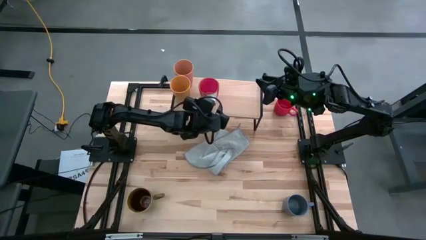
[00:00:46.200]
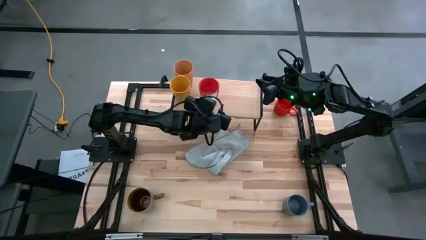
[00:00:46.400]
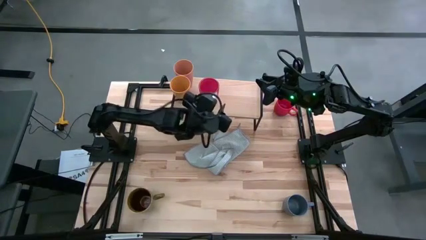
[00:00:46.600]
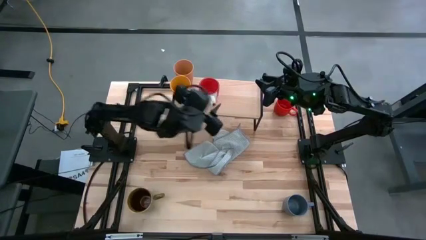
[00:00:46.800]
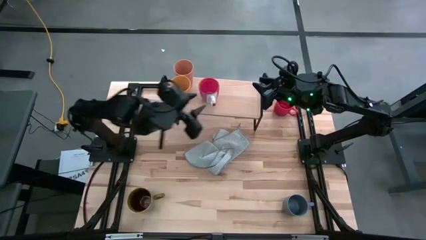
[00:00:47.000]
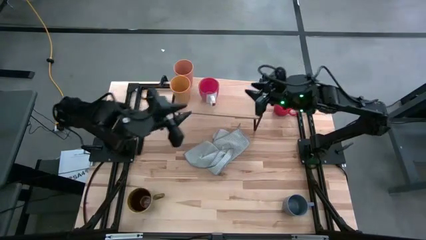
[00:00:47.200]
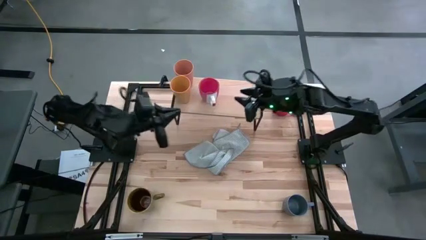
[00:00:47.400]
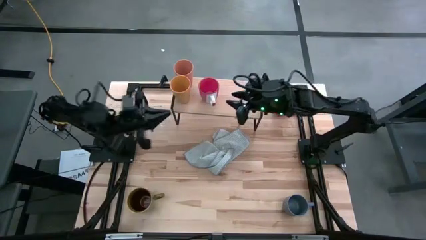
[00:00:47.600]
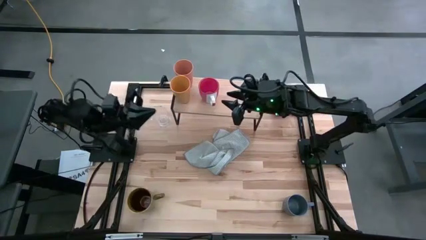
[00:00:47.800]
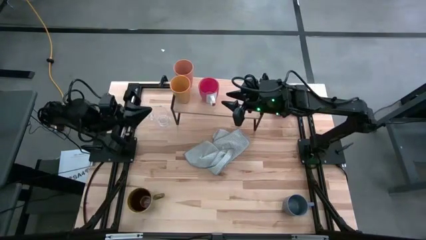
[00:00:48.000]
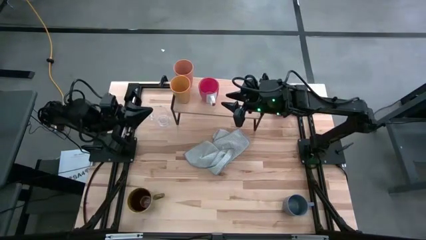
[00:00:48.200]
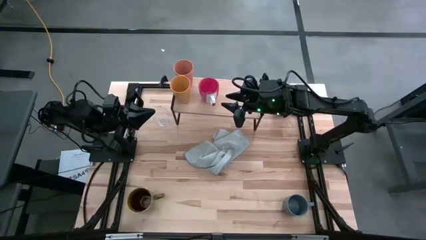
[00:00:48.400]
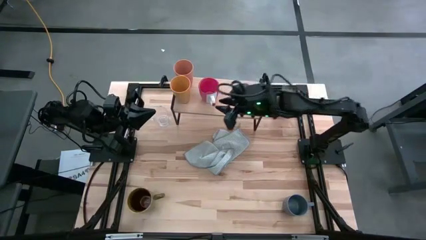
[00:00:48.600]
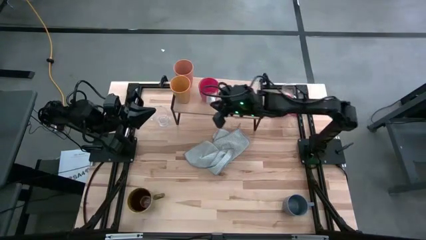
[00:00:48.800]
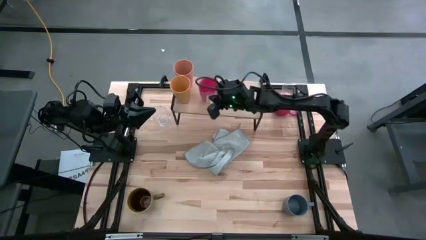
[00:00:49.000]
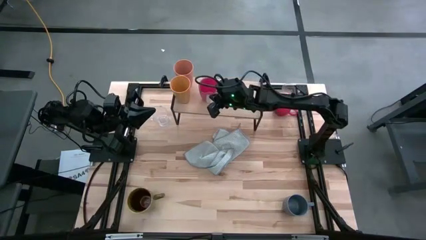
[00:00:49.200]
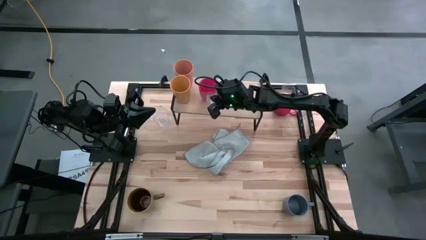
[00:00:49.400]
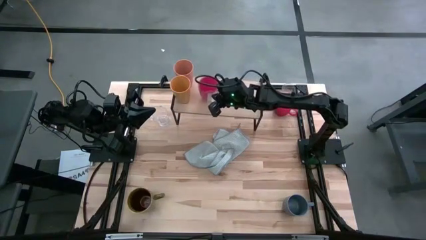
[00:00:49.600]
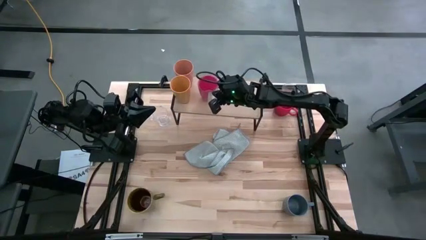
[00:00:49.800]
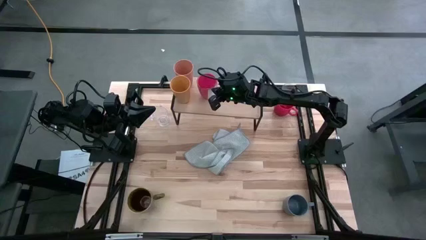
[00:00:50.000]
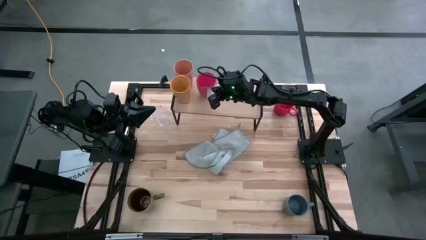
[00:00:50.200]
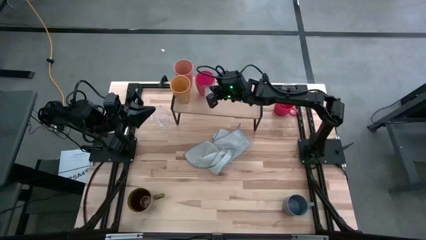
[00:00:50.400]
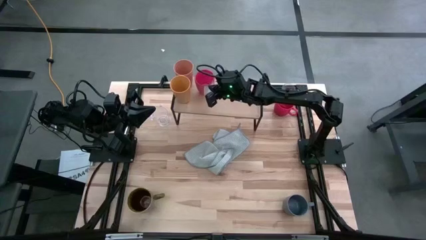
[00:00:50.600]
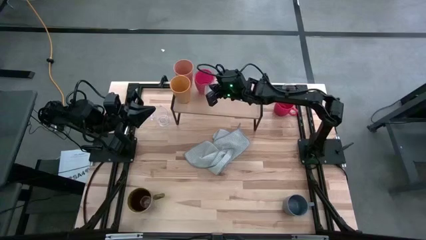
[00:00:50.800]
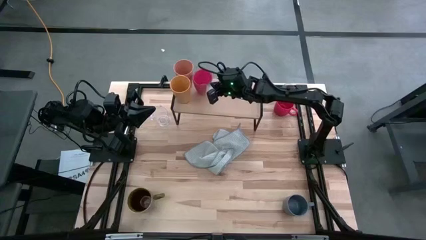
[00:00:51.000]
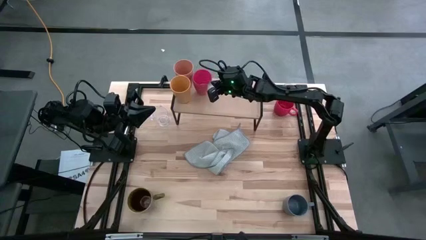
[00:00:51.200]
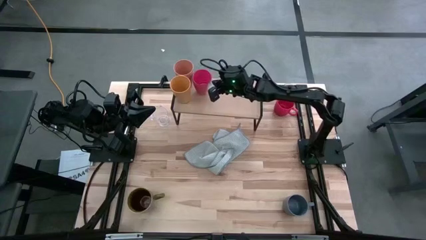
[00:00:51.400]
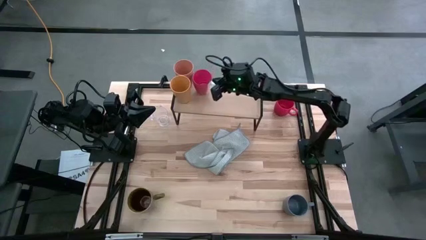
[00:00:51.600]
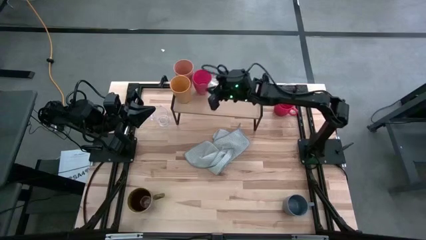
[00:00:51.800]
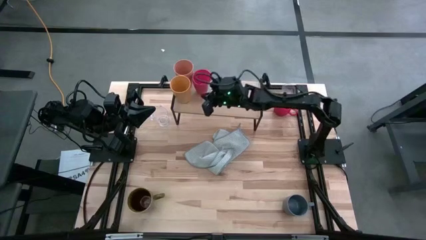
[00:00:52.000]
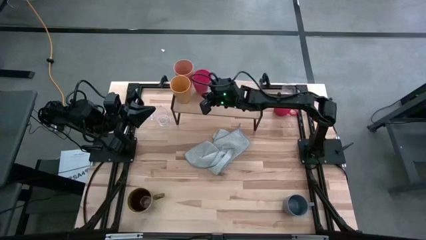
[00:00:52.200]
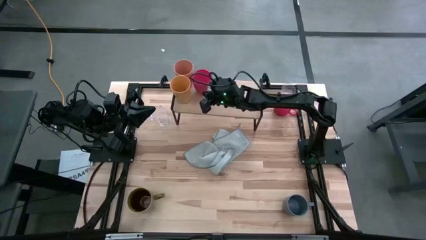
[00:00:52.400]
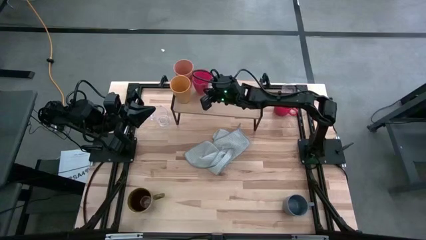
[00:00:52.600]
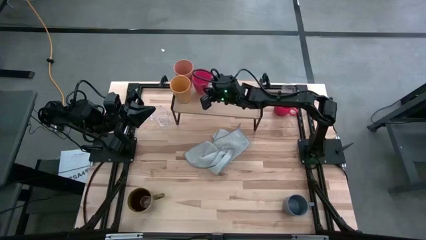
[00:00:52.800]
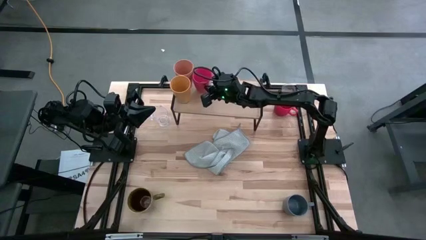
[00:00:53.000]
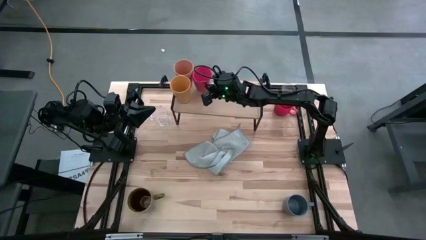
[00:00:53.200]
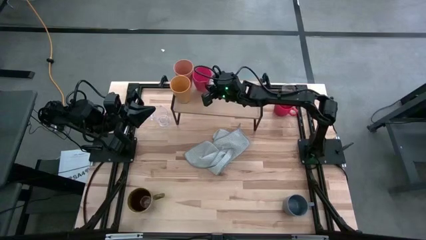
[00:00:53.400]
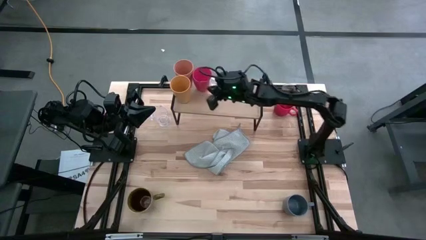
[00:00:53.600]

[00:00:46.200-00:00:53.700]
Task: Stack small to large cups/mugs on shelf
Adjust the red mug on the shelf

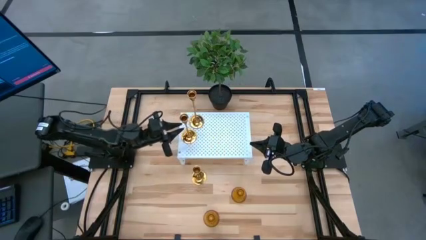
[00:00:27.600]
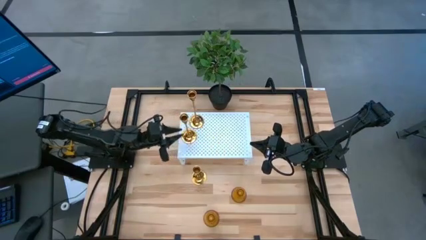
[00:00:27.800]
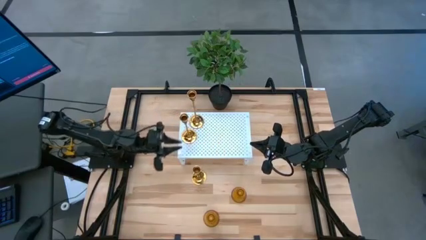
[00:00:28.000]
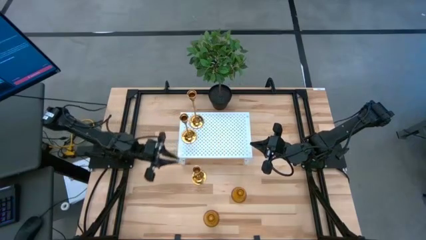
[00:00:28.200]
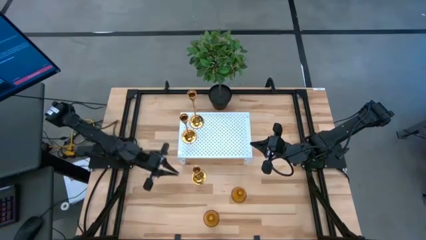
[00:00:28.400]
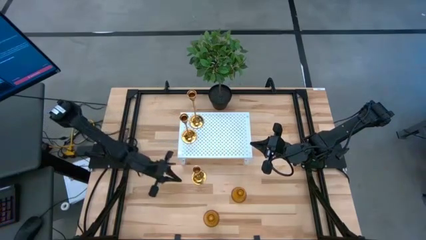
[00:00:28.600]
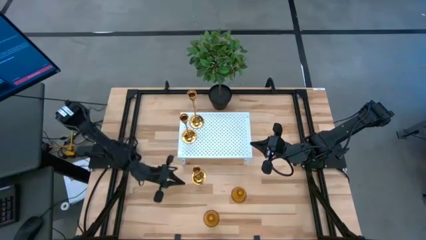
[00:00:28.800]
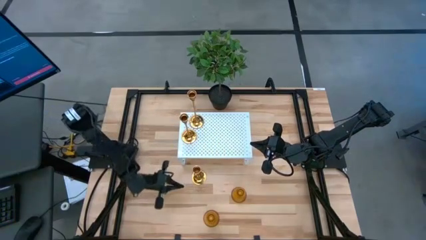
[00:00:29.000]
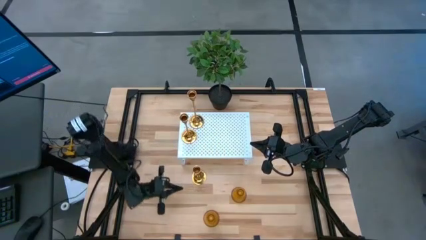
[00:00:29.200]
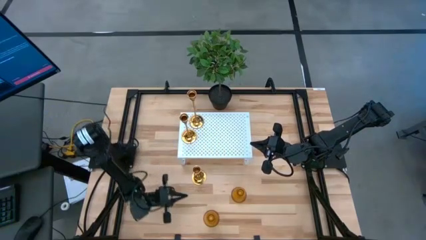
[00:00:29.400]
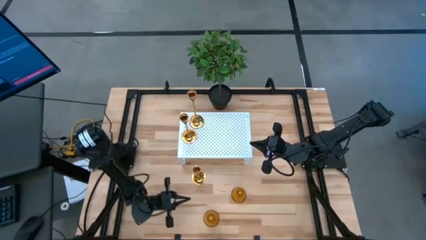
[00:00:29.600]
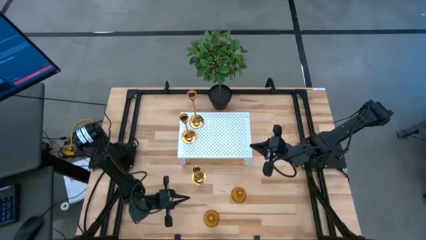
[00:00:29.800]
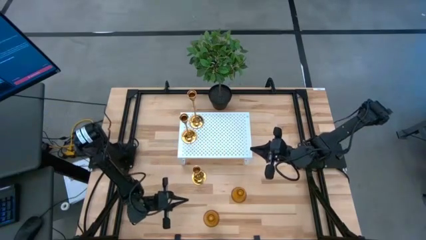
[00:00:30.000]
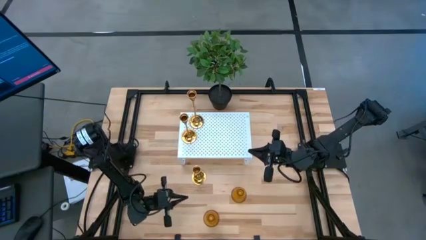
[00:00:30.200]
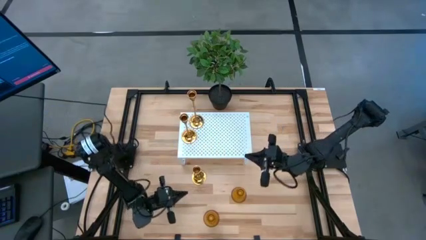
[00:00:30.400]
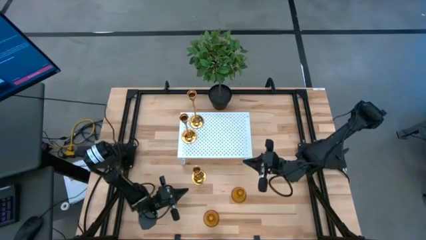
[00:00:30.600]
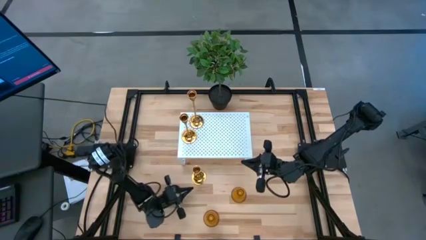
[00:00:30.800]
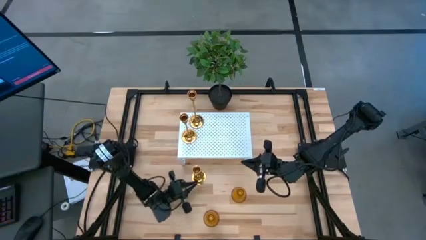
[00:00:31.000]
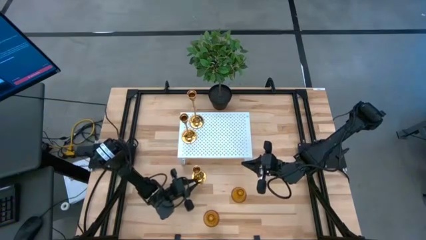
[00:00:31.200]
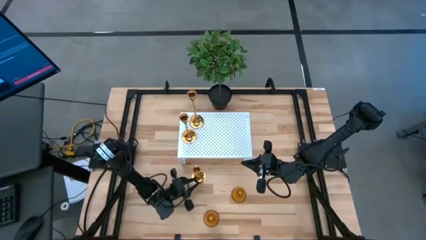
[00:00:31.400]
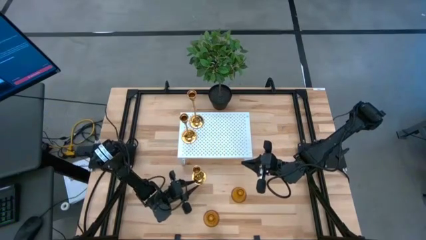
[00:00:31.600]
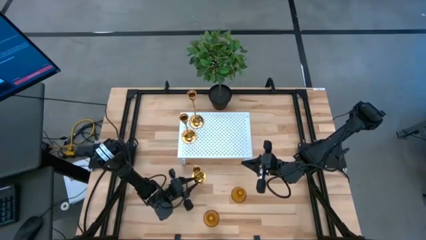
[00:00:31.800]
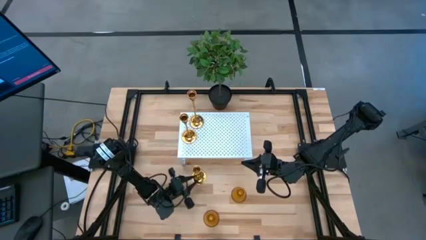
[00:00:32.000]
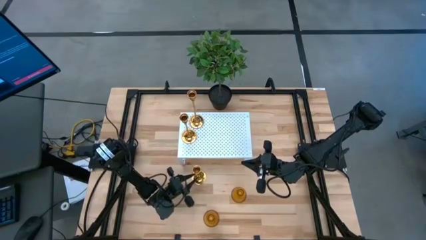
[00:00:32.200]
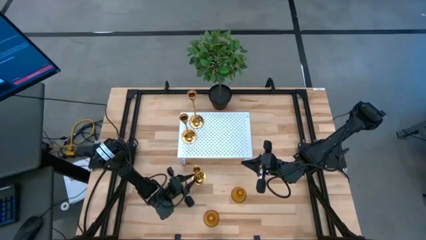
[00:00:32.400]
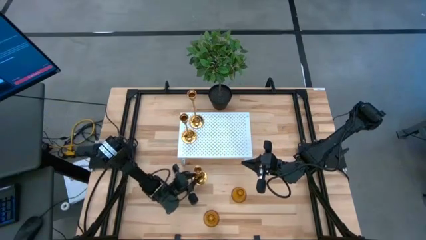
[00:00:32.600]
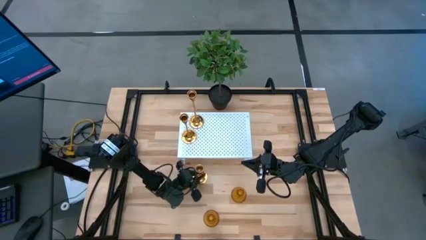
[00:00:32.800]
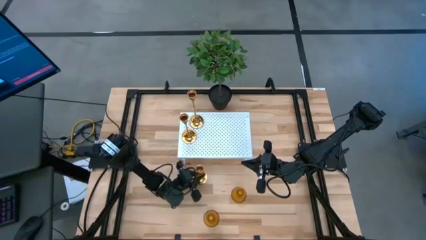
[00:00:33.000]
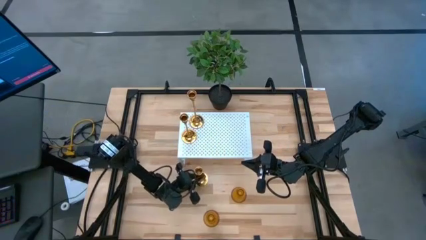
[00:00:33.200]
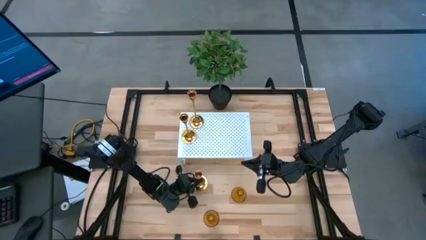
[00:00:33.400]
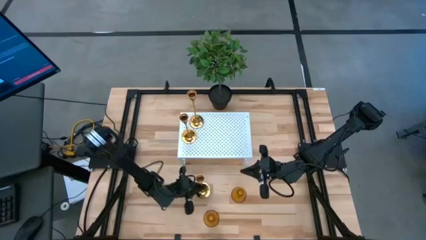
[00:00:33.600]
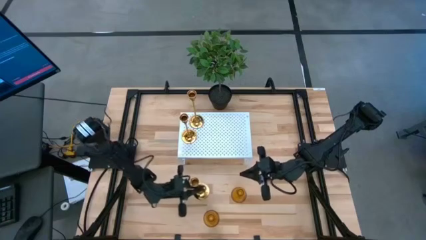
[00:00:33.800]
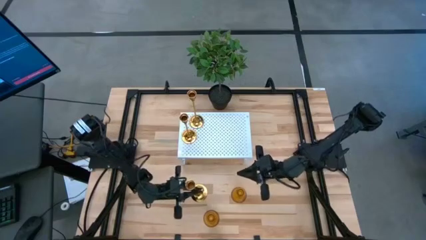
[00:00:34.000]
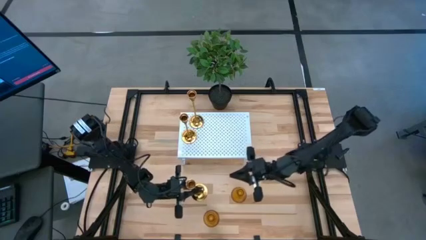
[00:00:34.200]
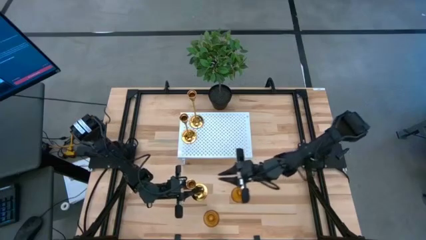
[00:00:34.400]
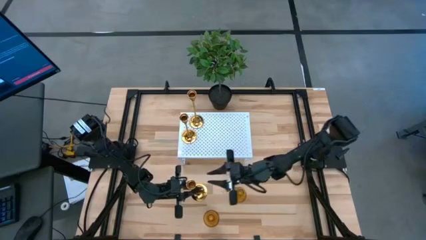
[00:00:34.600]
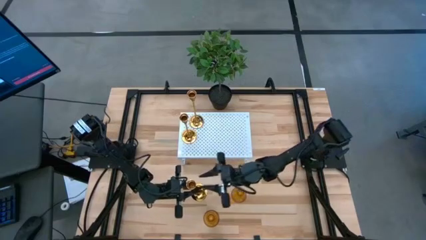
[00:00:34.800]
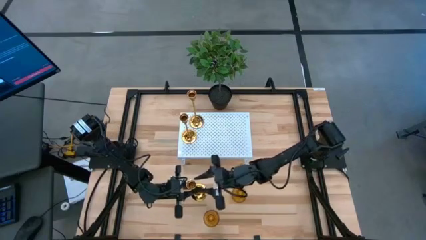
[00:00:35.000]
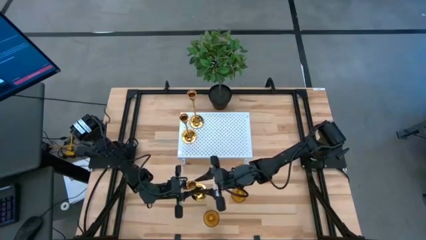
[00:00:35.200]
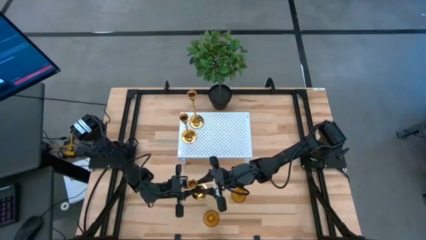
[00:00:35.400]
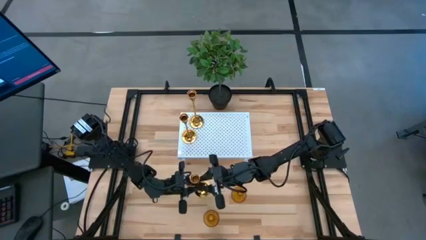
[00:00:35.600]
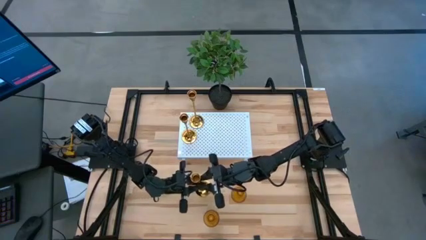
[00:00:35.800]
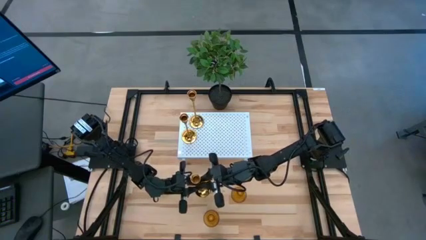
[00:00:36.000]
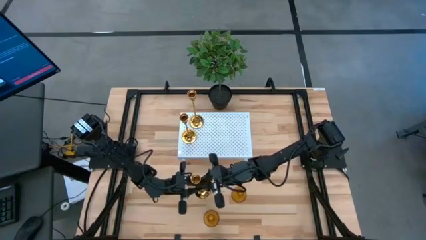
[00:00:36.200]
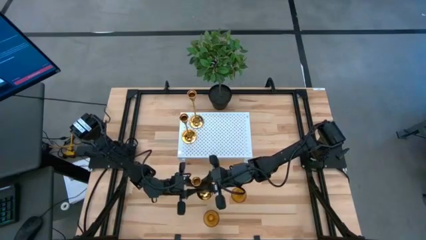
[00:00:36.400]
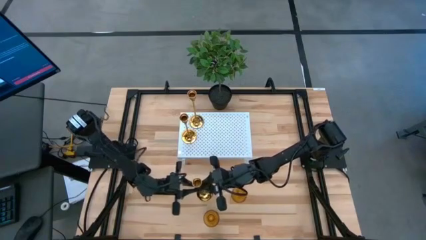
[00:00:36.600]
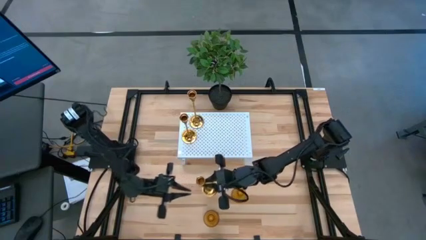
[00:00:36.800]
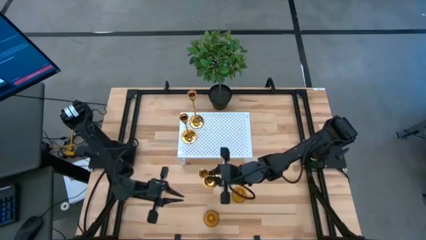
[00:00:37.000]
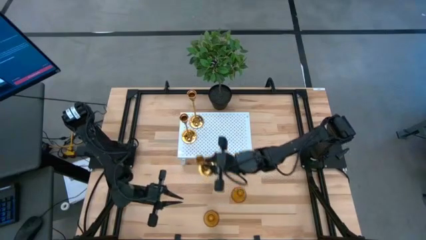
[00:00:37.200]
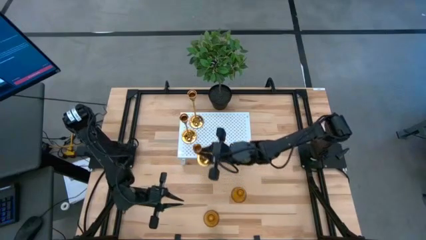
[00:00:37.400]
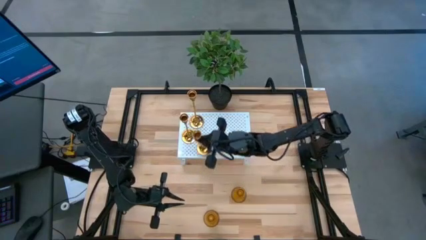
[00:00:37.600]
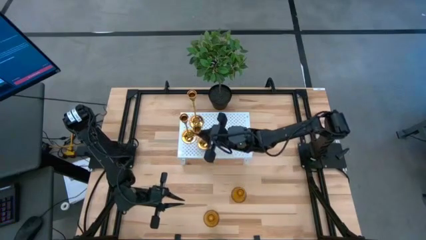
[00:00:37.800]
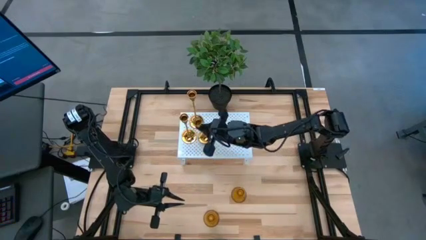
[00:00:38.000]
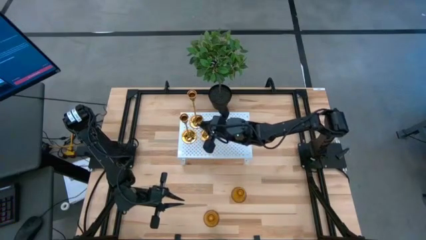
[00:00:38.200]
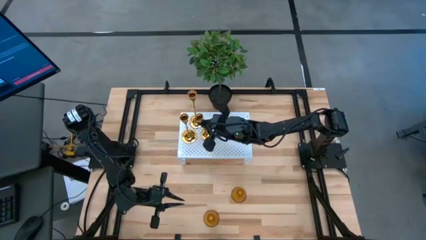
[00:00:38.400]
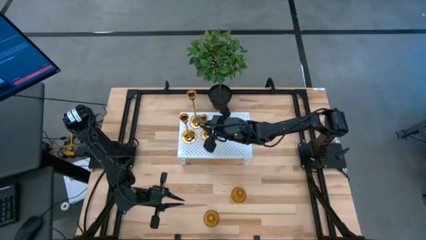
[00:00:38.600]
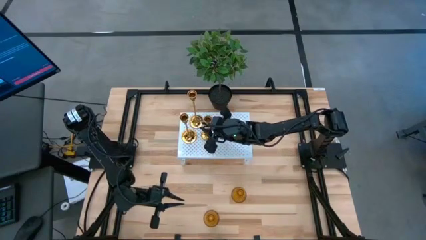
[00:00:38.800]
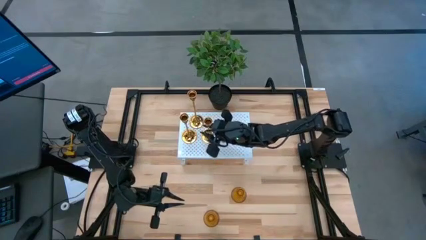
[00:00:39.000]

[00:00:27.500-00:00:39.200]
Task: Pick & Place candle stick holders
Put the gold candle holder on the shelf
